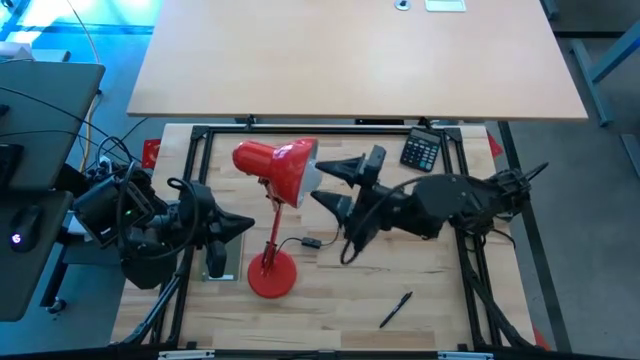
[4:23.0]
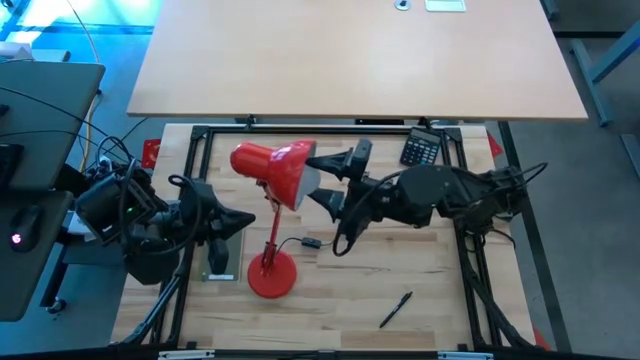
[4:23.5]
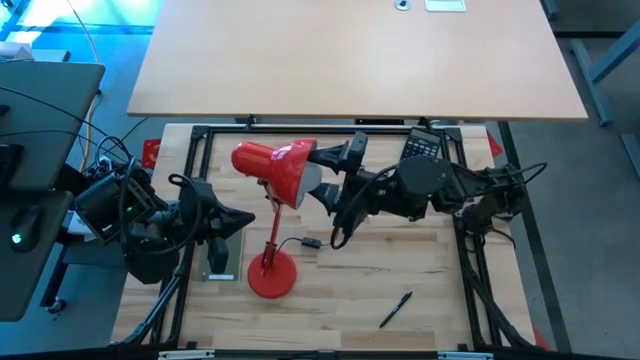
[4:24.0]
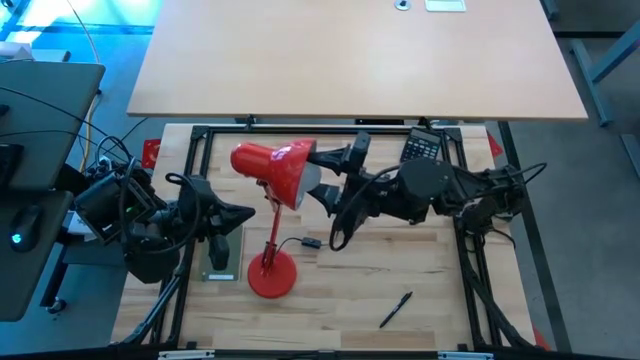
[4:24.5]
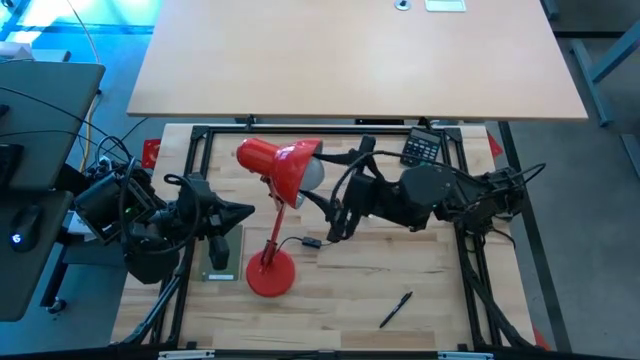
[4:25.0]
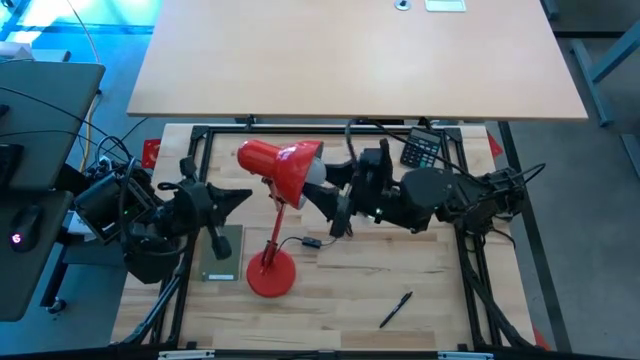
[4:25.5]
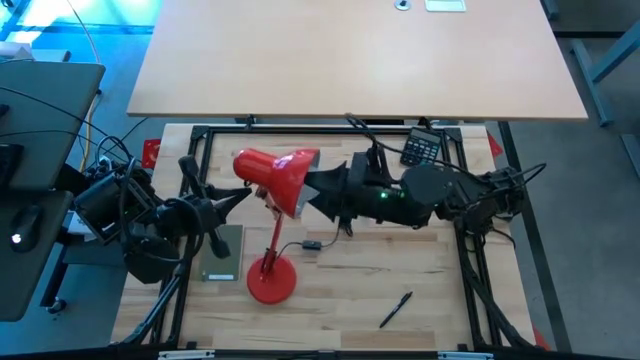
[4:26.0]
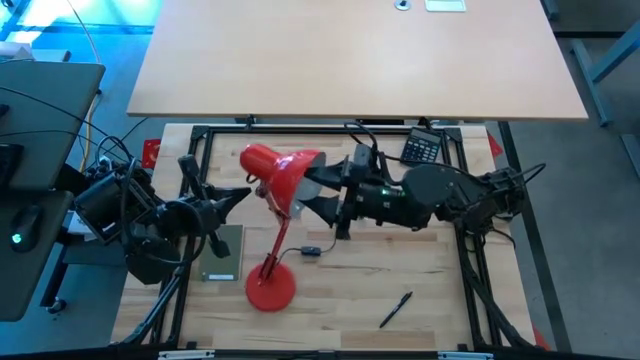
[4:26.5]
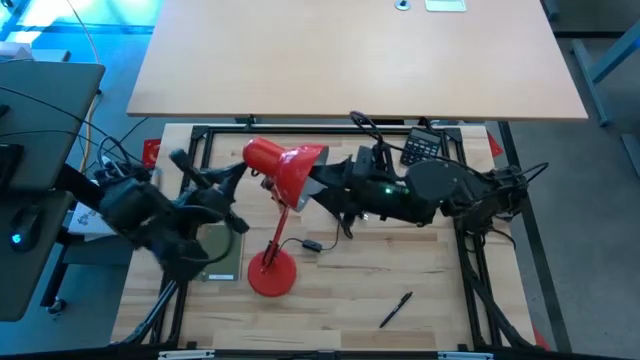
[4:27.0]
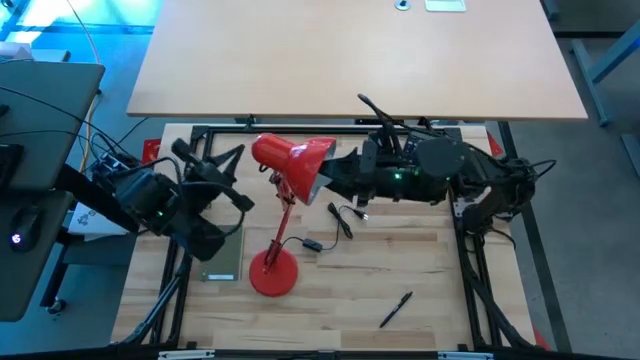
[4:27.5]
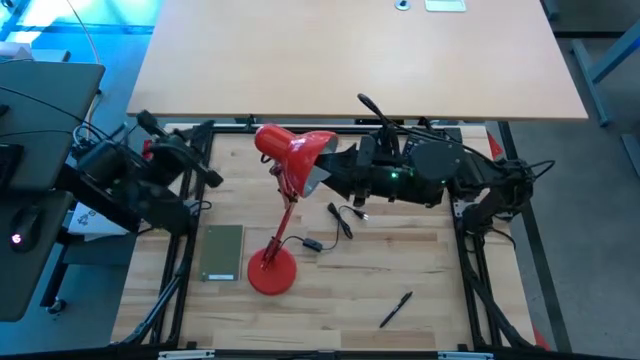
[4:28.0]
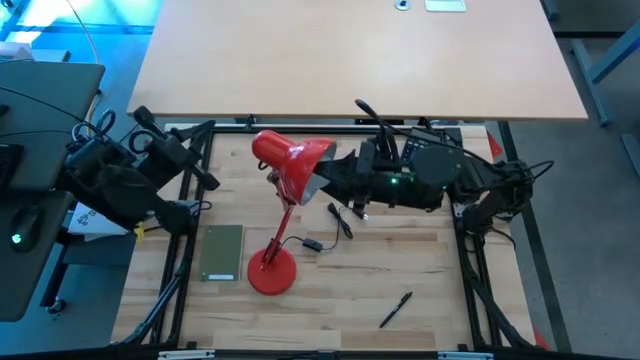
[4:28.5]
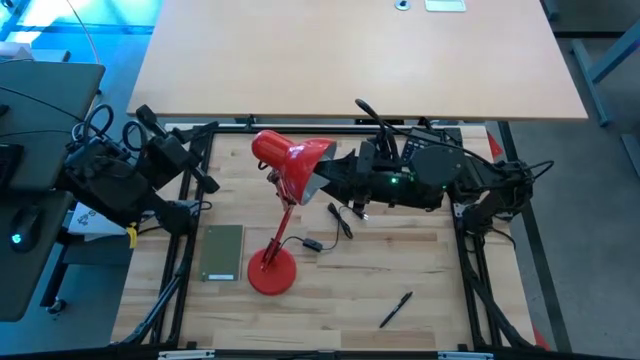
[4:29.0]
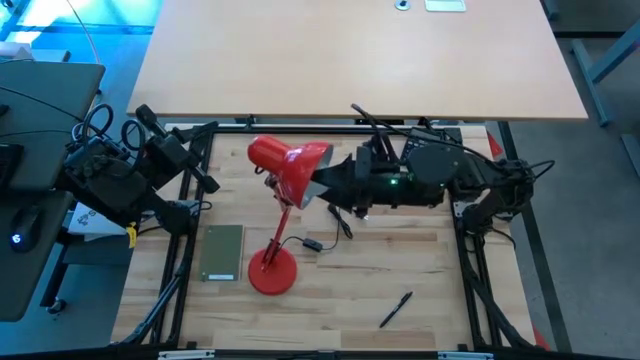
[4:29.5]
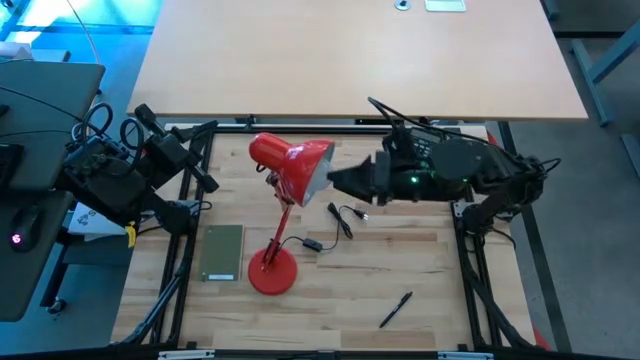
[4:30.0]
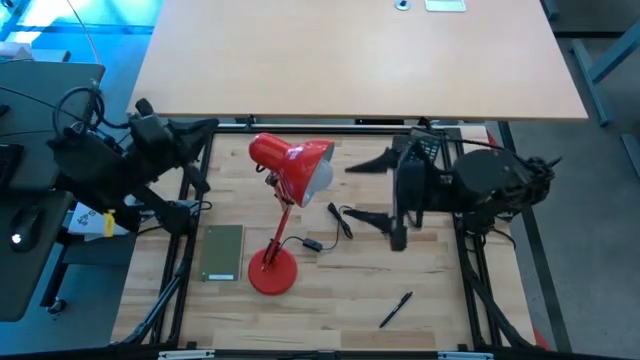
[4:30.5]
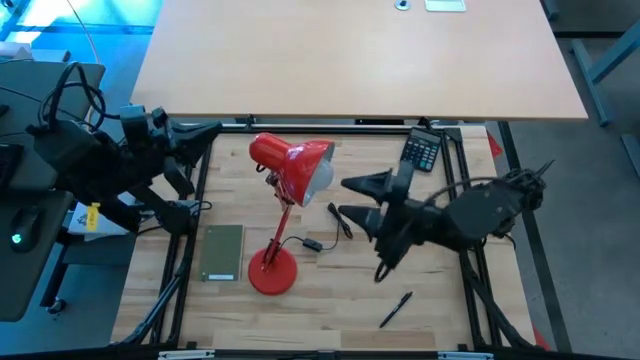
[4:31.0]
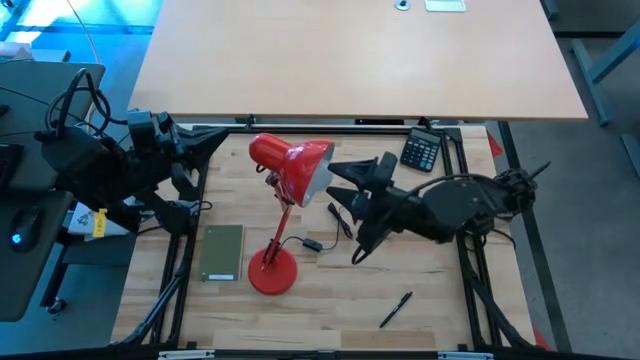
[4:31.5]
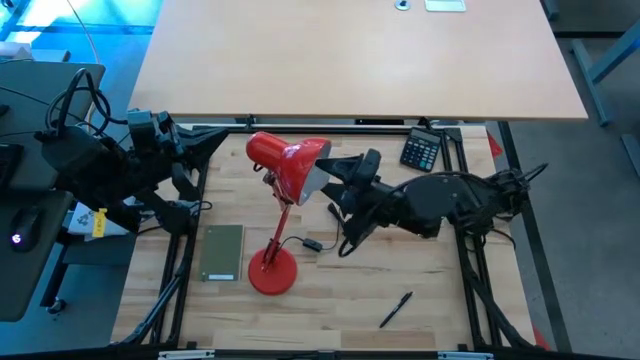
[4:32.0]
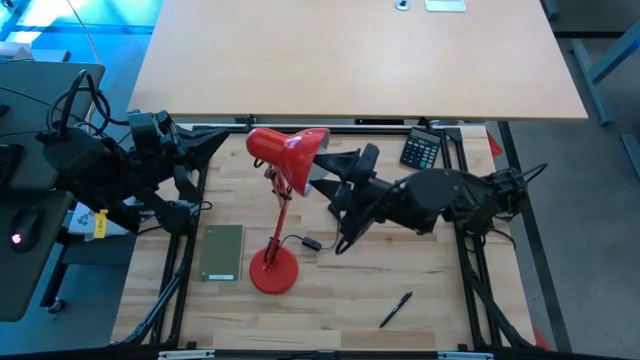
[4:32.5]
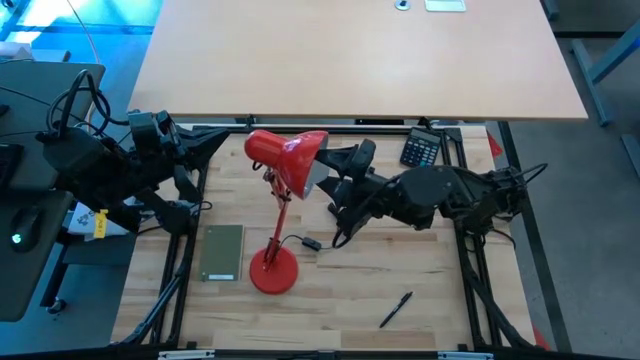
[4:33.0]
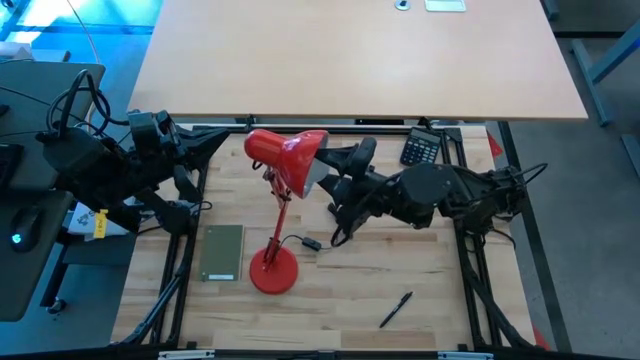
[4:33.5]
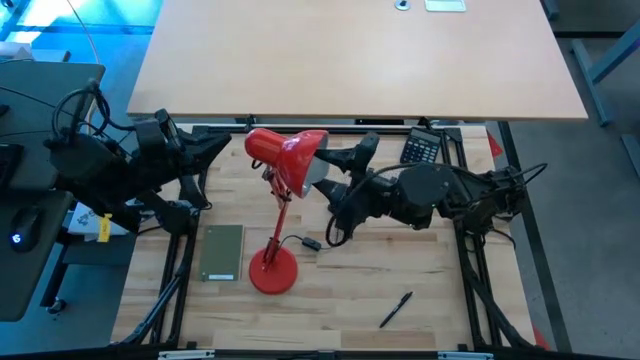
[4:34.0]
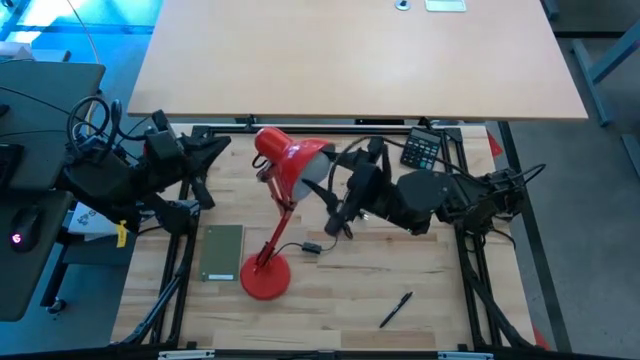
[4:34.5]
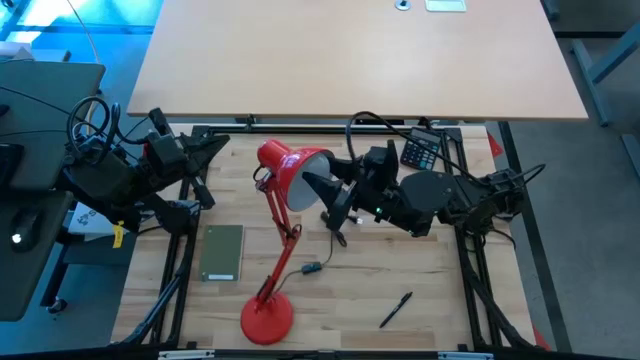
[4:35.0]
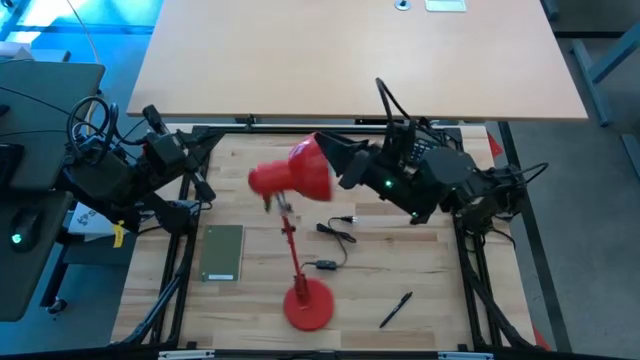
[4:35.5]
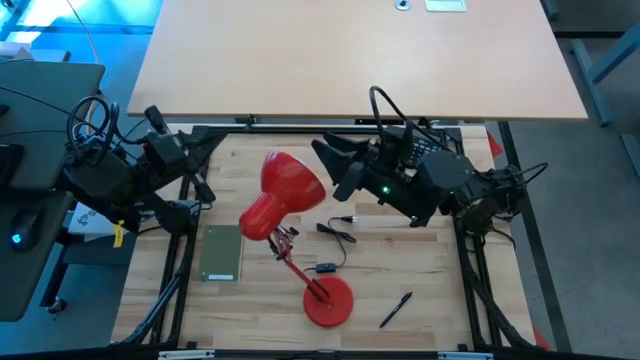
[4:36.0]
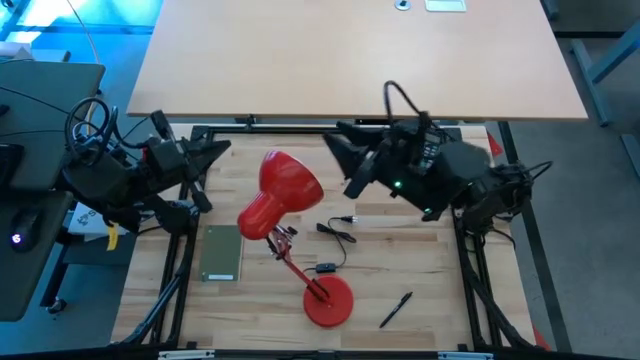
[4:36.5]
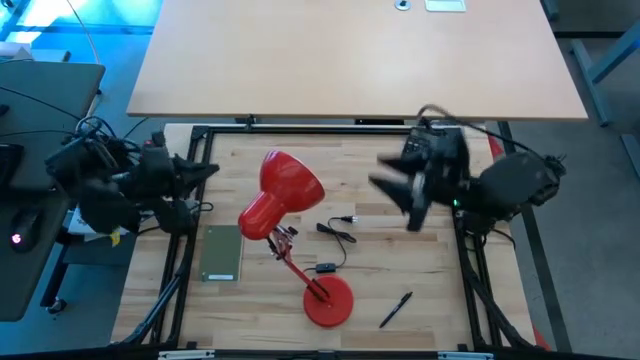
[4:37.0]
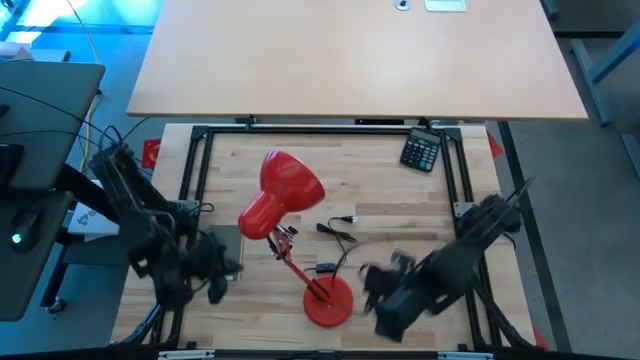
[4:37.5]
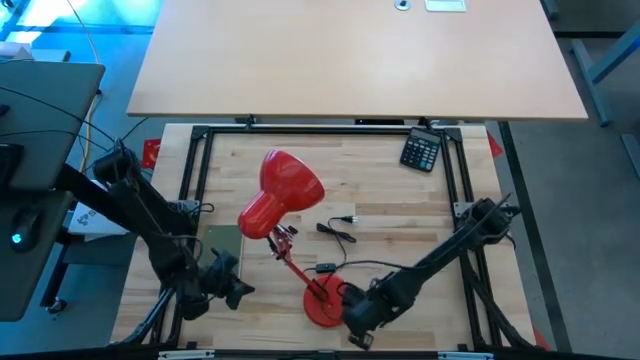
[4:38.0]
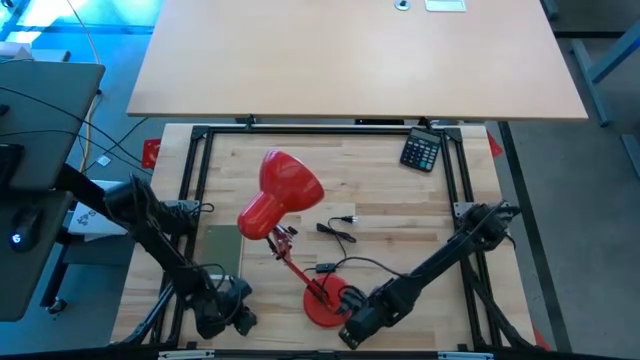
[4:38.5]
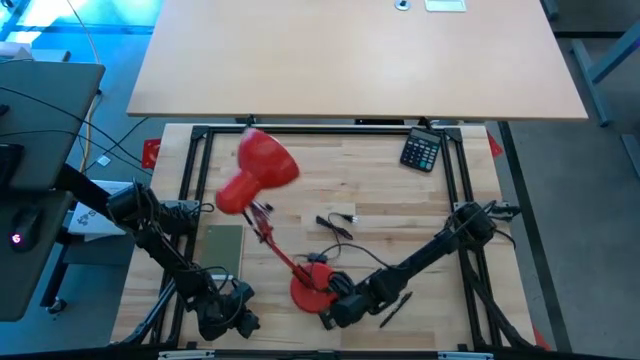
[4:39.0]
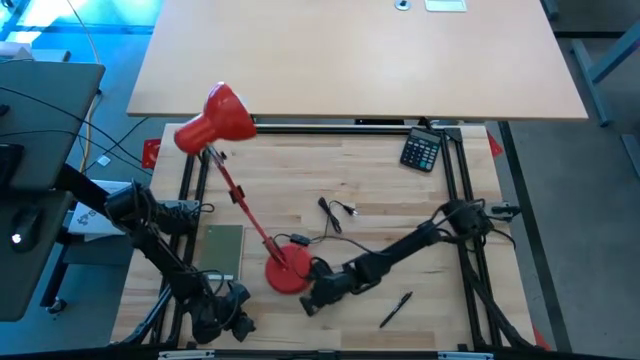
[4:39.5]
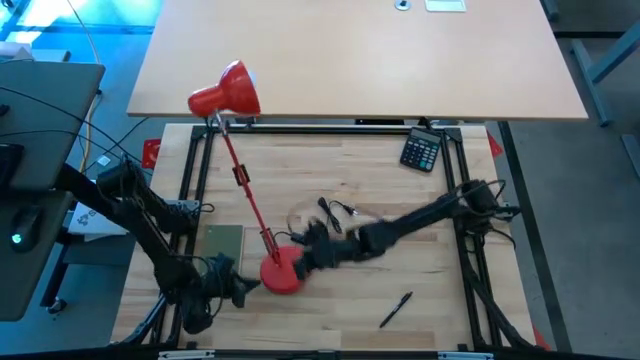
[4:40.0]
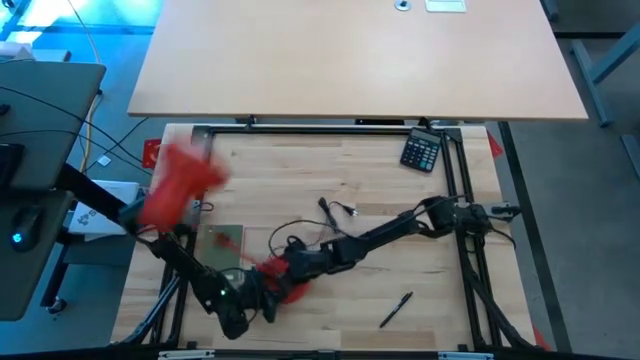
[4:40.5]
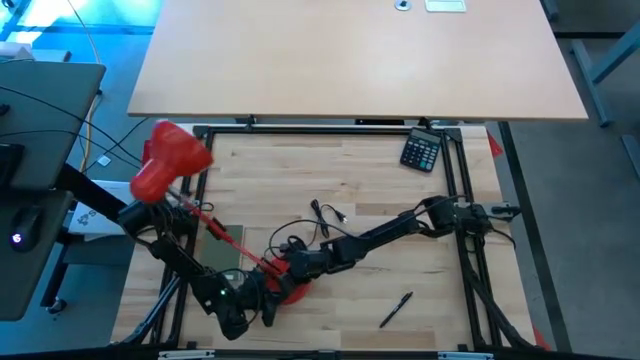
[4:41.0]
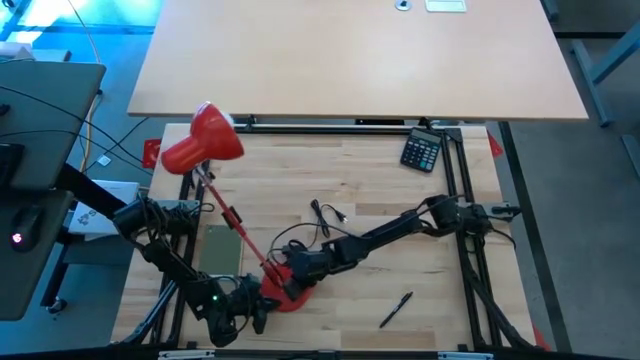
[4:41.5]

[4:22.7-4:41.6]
Task: Screw lightbulb
Insert the white lightbulb into the red lamp

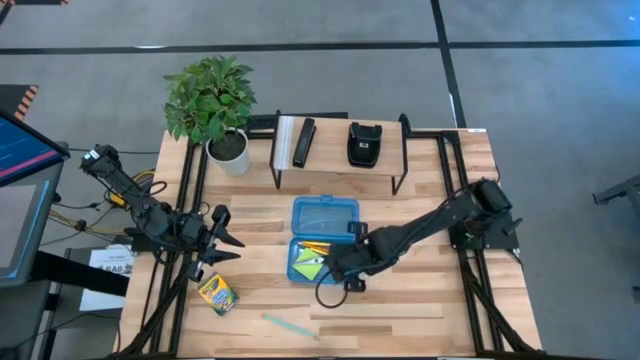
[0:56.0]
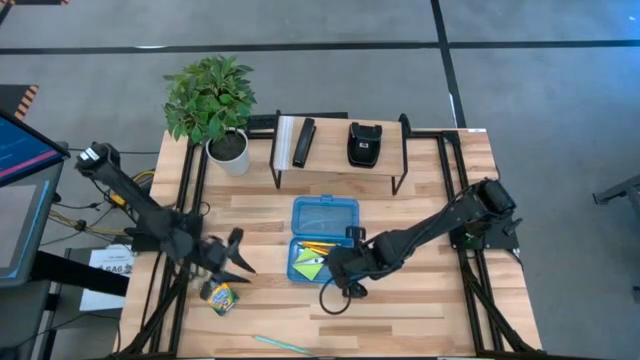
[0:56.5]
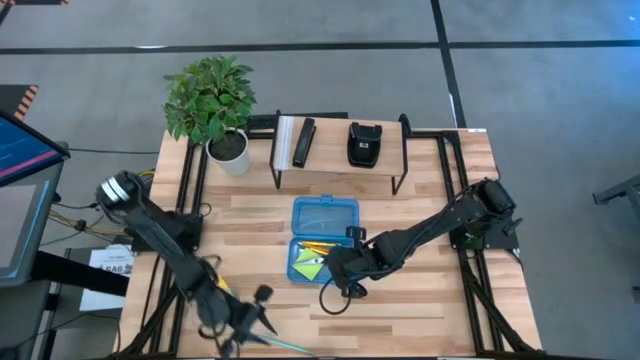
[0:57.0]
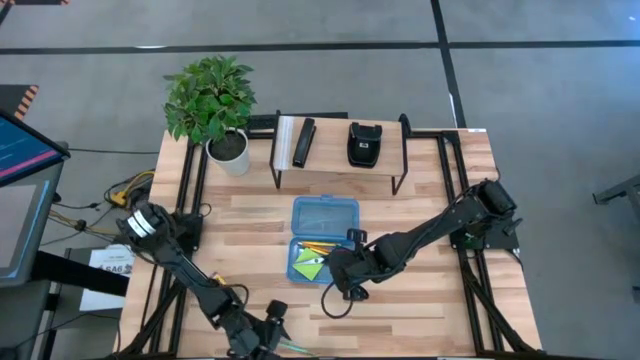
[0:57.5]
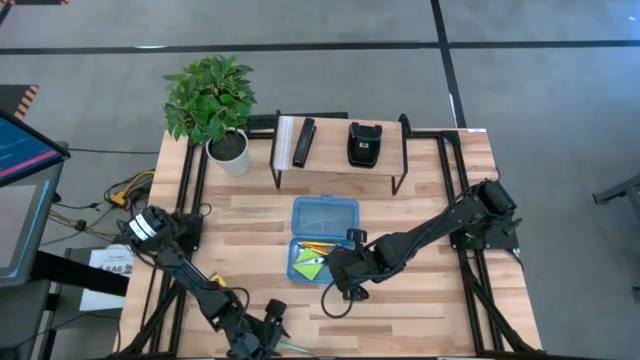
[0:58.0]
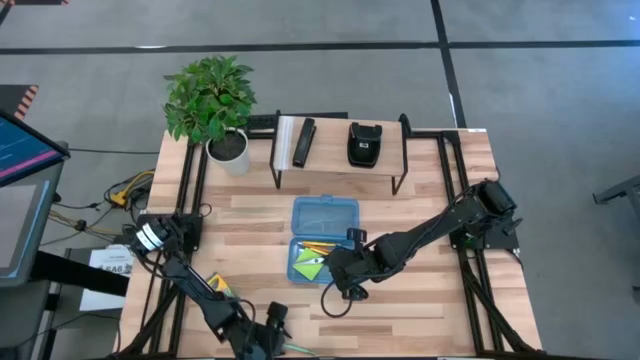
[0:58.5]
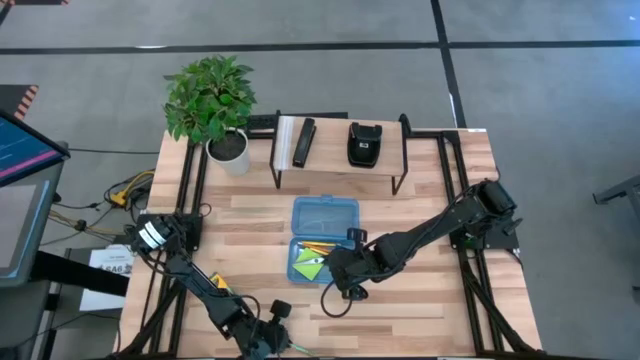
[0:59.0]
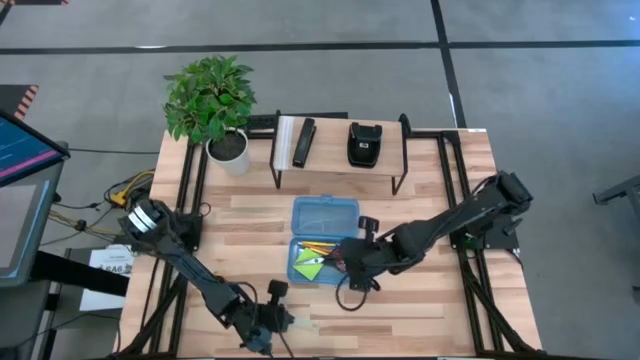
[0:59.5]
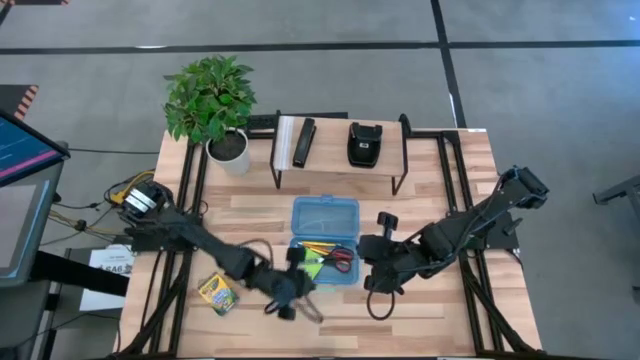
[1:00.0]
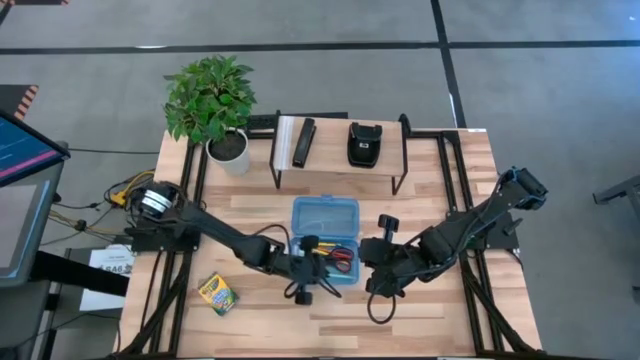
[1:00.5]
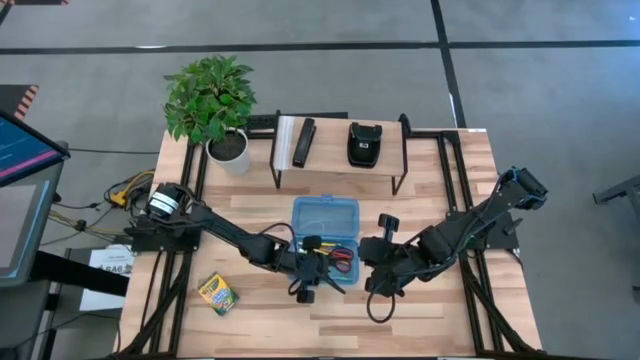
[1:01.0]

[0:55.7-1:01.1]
Task: Pack school essentials
Put the blue pencil into the blue supply box
